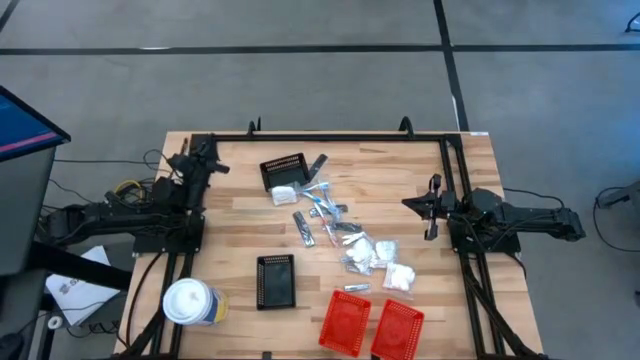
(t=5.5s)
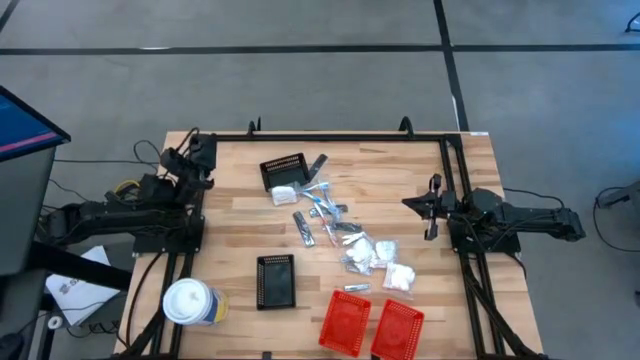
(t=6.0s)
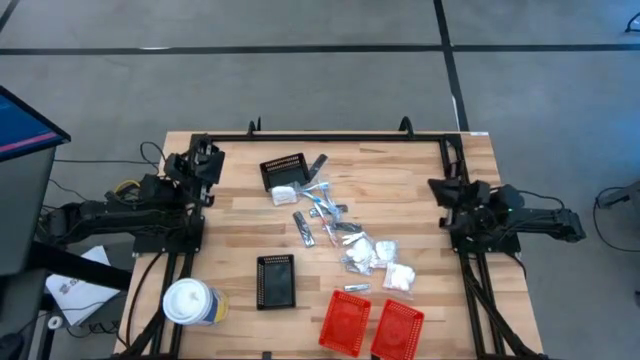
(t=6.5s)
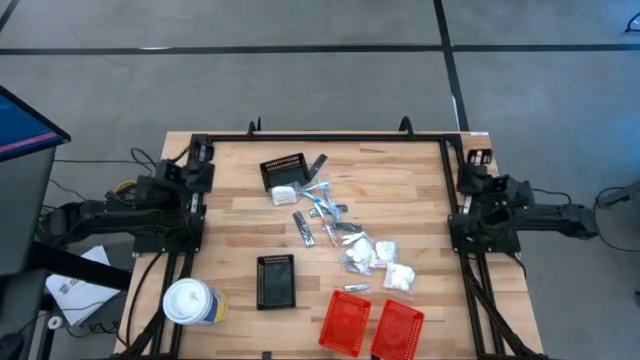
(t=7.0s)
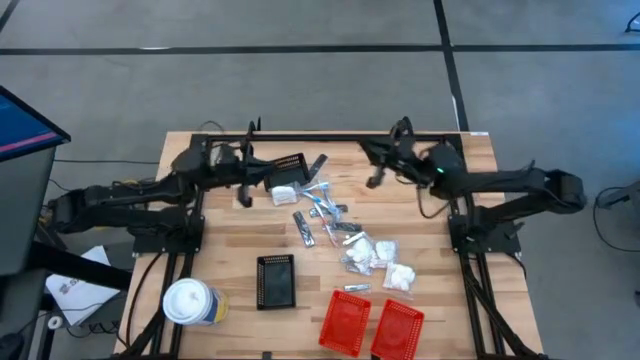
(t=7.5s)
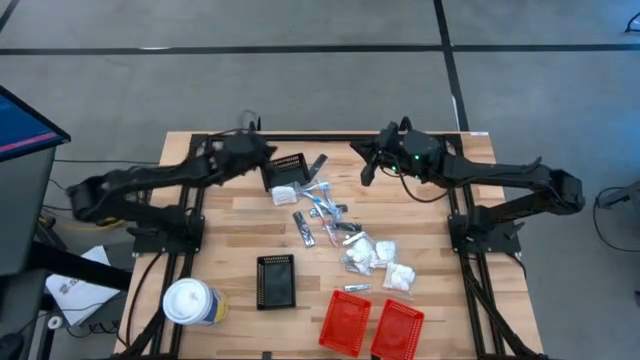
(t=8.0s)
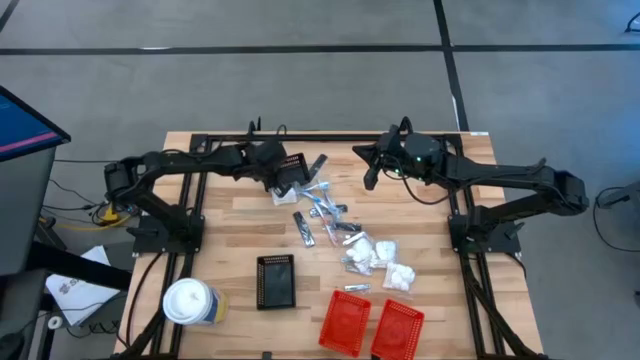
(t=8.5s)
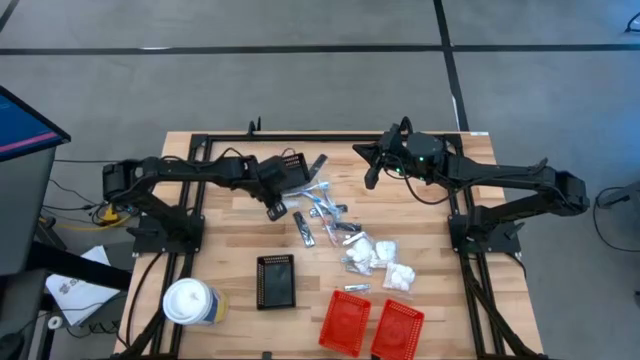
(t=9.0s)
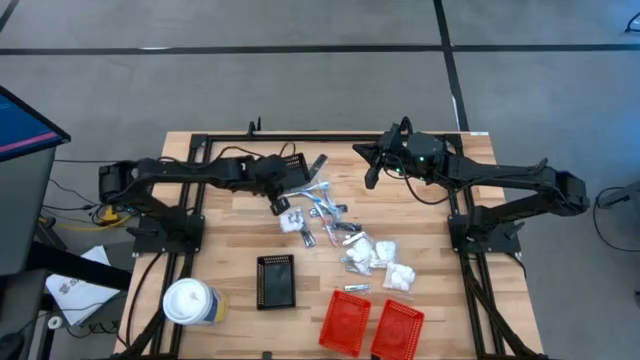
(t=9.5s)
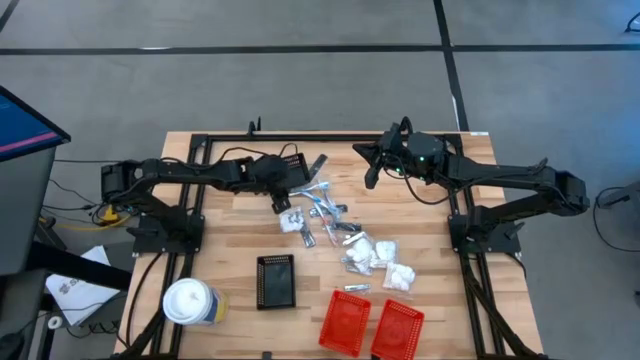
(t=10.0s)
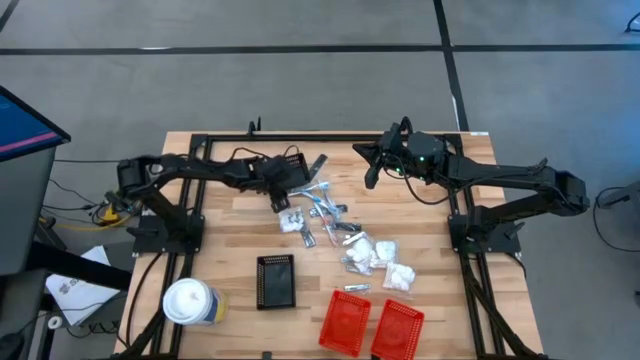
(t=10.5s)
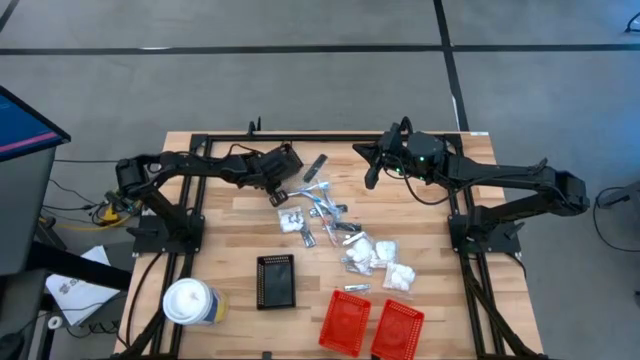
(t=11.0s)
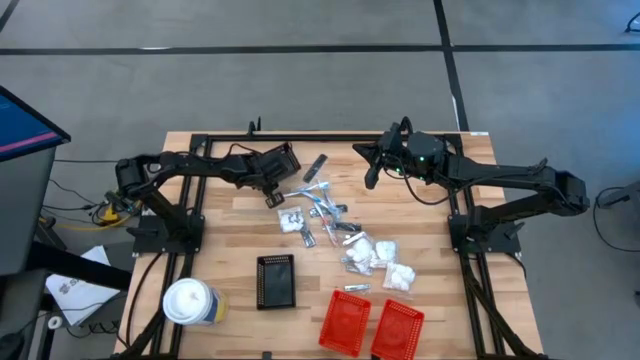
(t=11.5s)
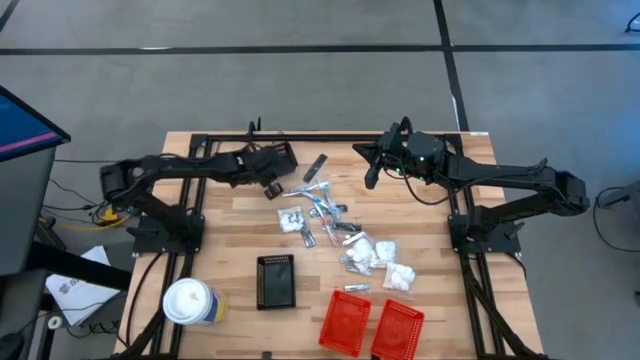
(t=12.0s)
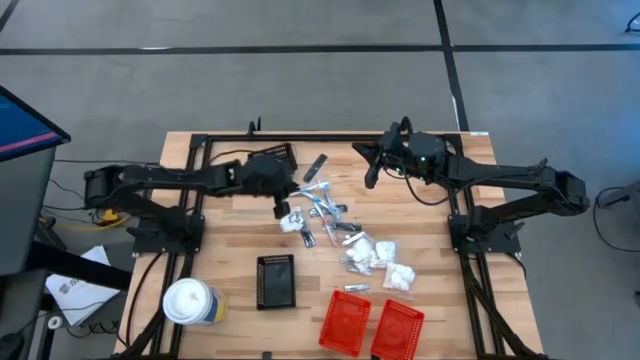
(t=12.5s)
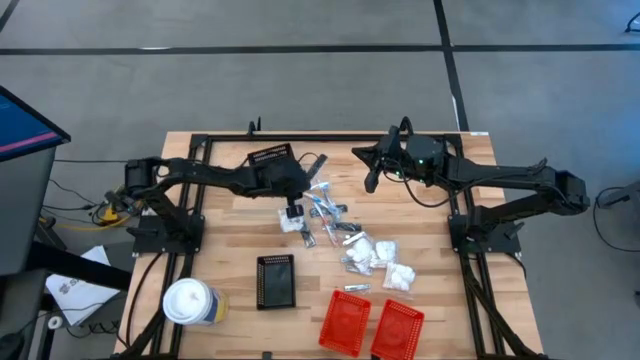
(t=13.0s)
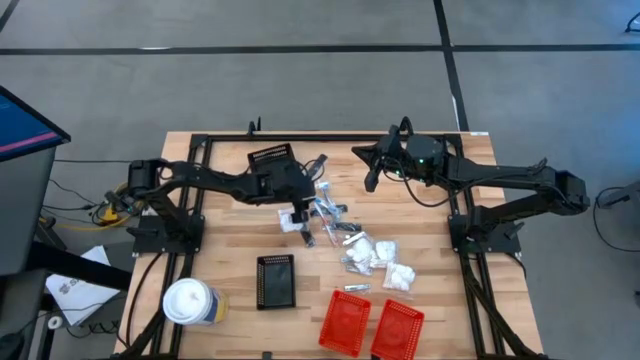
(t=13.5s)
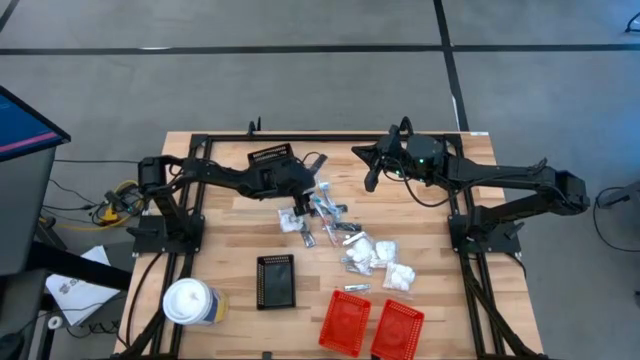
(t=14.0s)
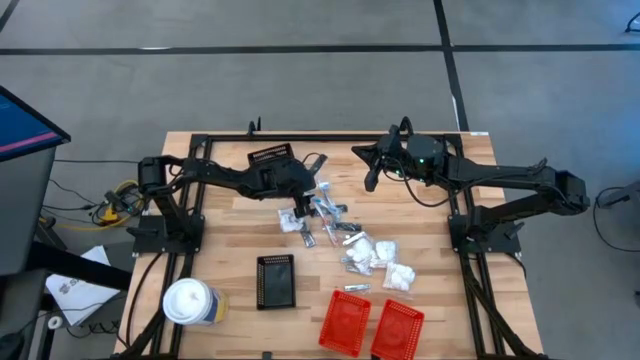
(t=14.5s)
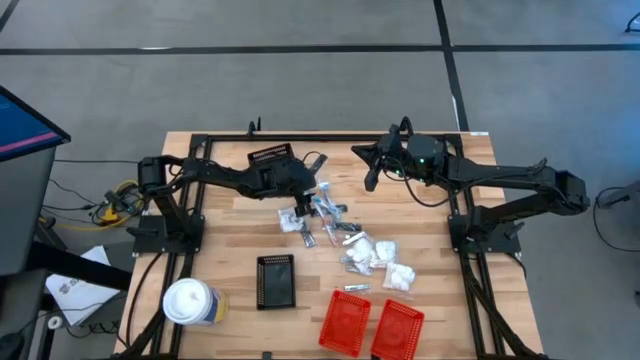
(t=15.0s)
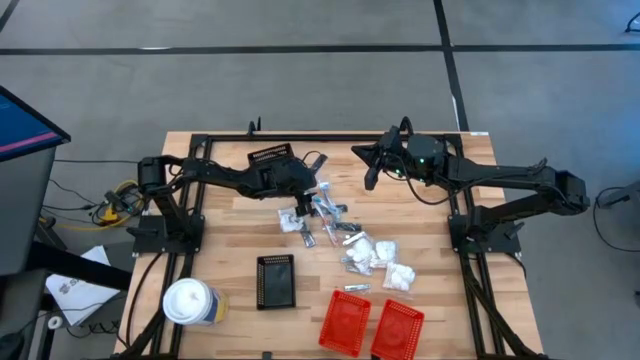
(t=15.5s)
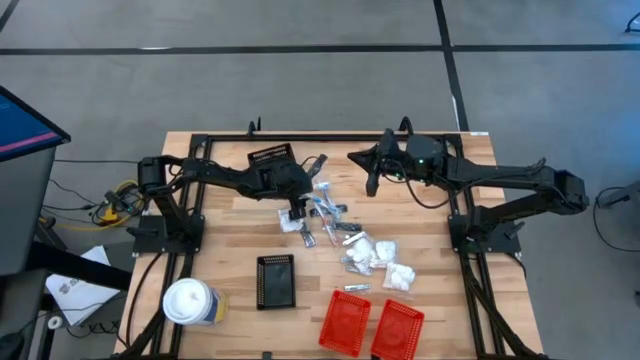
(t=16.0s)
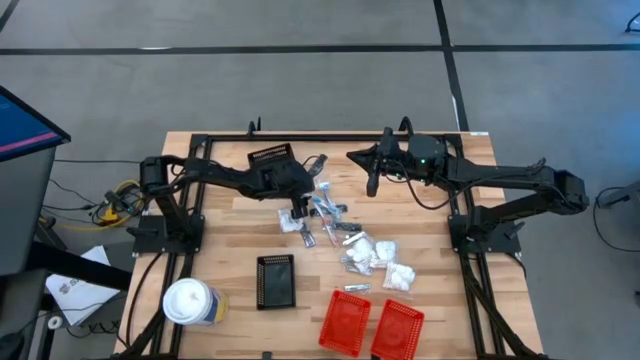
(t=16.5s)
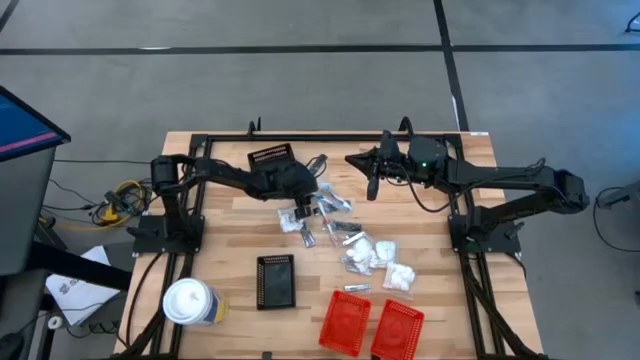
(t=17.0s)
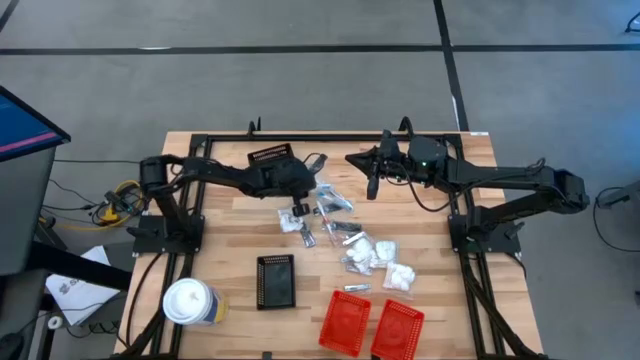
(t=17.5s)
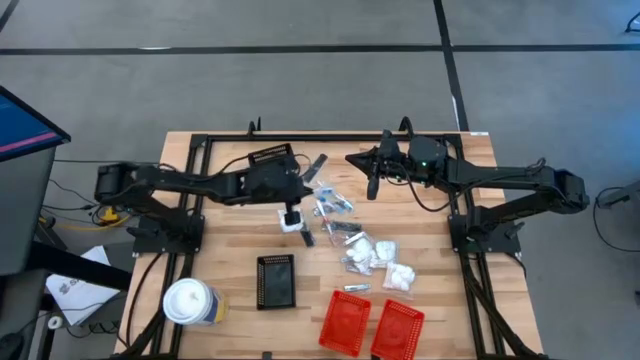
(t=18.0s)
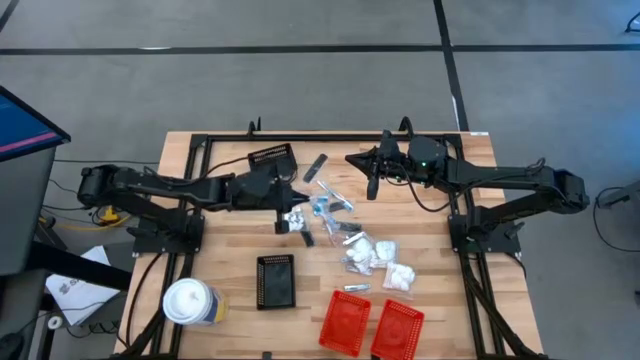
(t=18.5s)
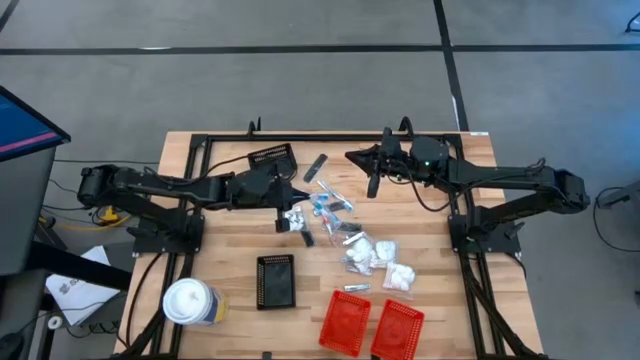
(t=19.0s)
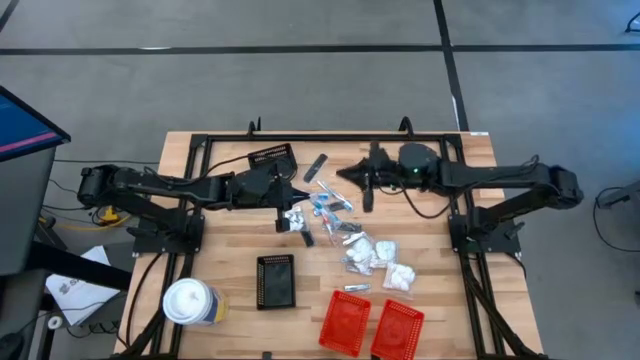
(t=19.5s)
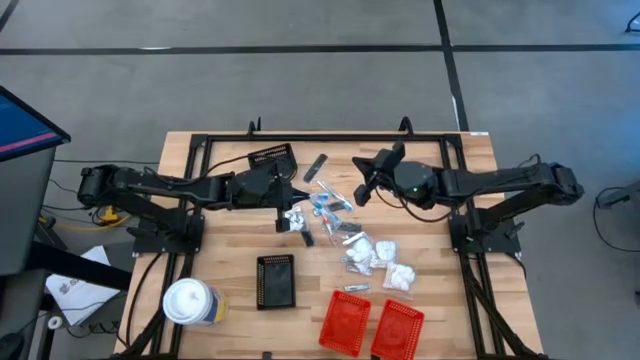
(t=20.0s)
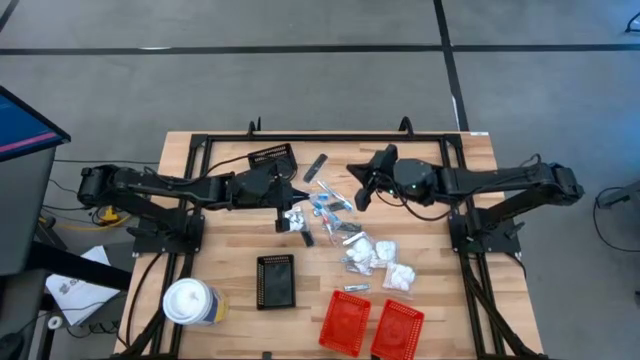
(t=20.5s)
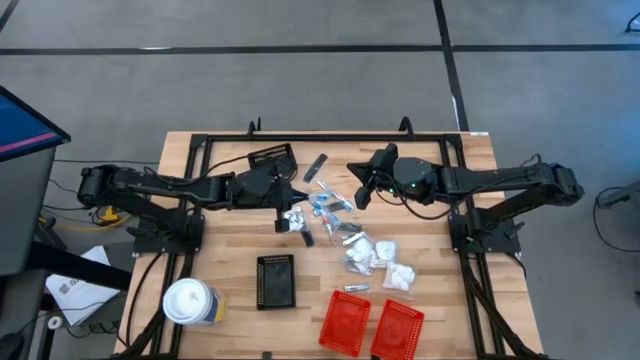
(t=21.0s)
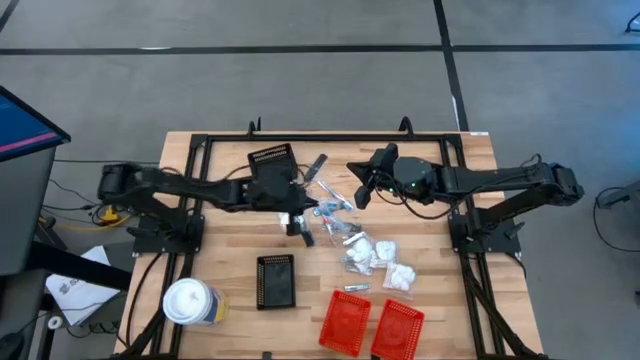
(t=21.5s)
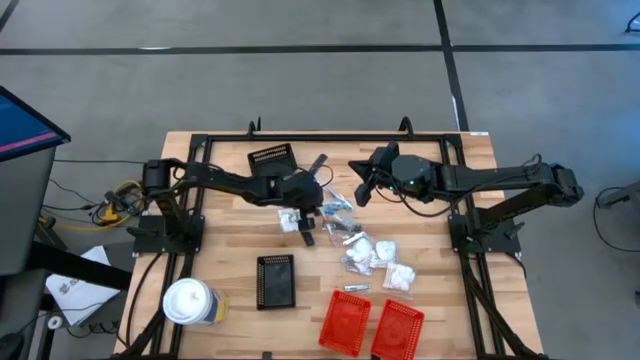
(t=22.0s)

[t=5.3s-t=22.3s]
Task: Pick & Place Travel size toiletries
Put the blue toothbrush into the top black bin

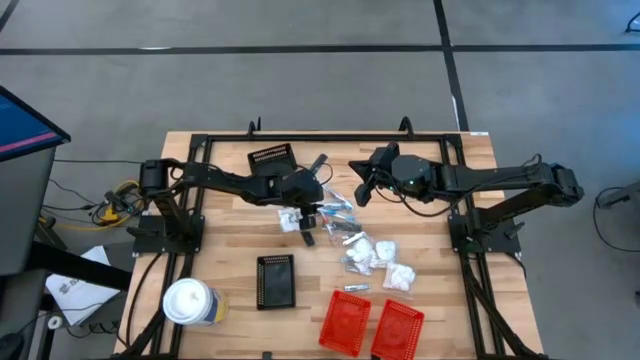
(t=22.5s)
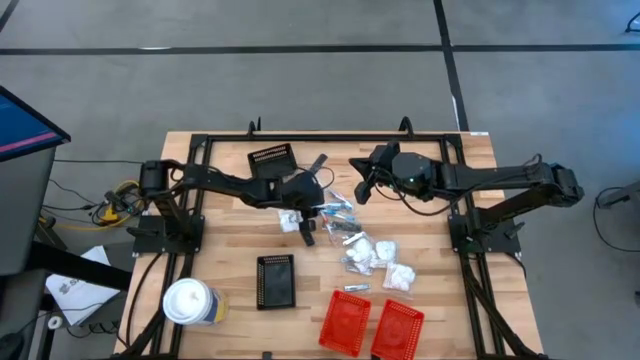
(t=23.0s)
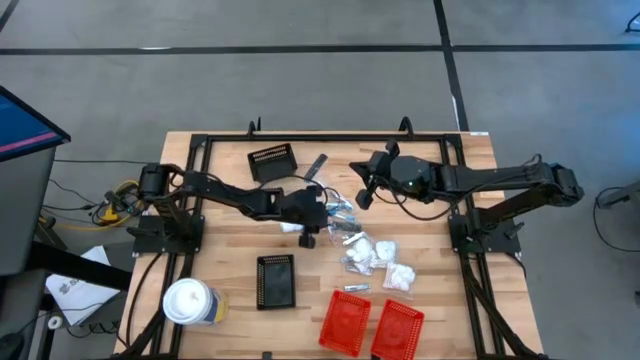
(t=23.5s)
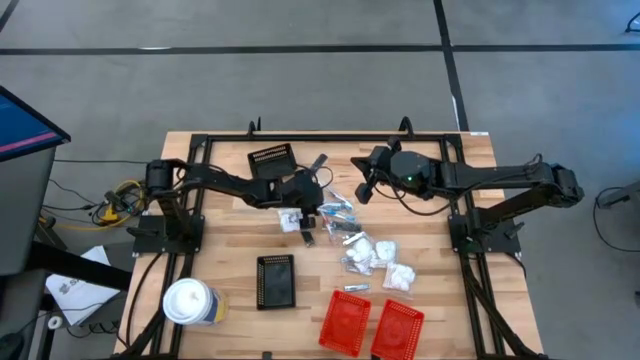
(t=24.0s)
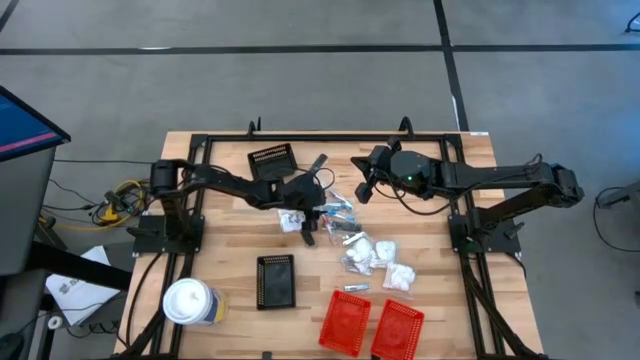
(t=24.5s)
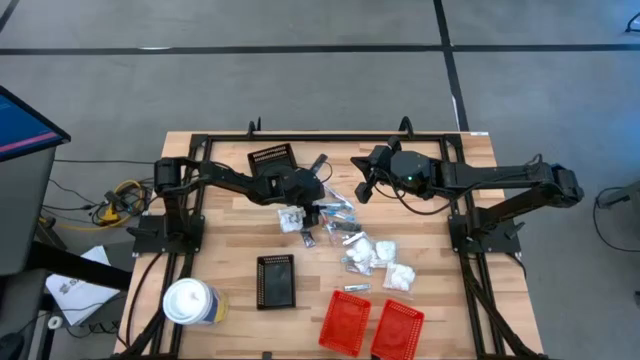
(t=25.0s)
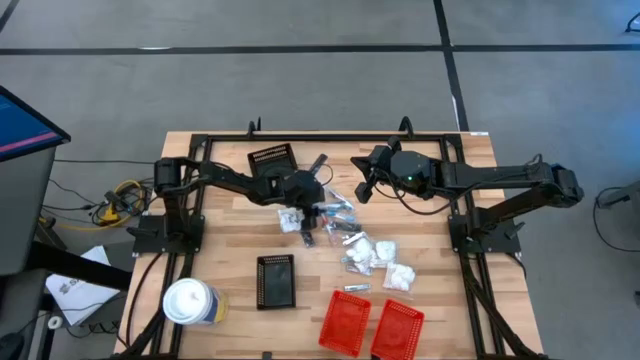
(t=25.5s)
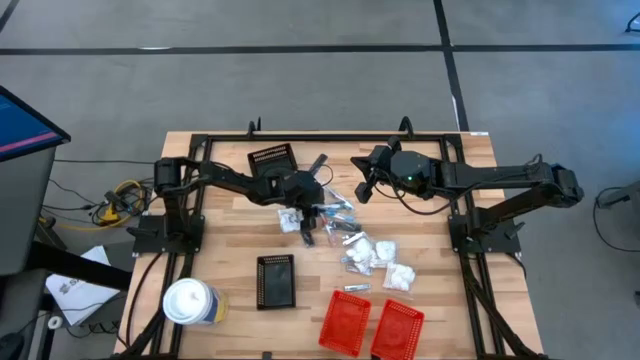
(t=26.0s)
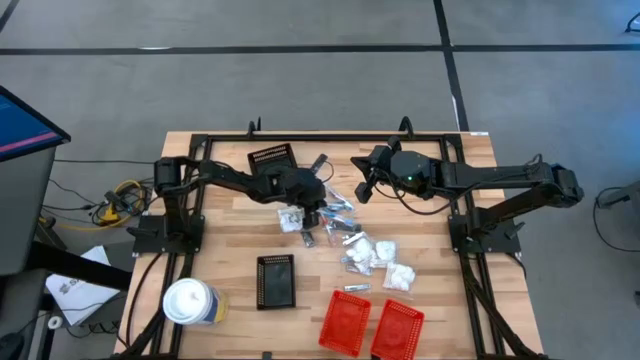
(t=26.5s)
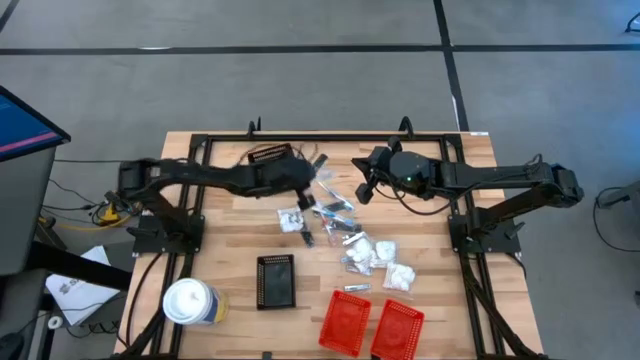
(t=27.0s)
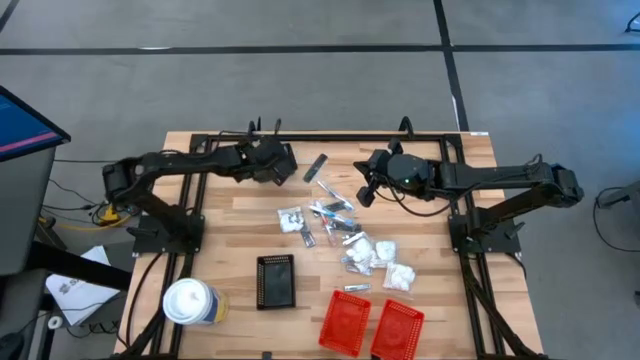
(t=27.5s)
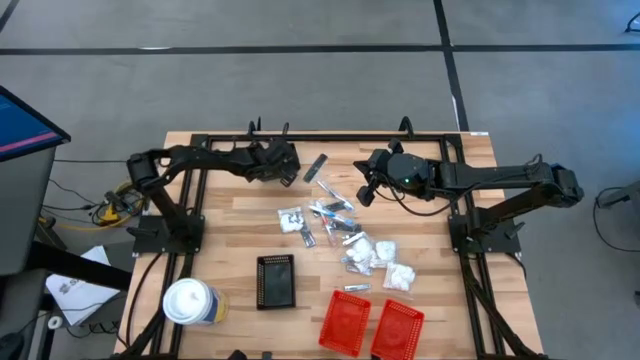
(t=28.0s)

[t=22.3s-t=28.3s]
Put the blue toothbrush into the top black bin
